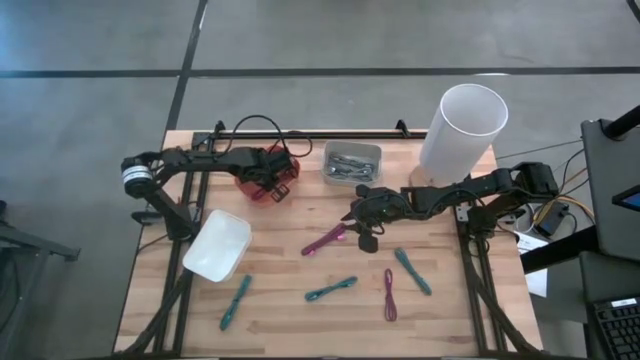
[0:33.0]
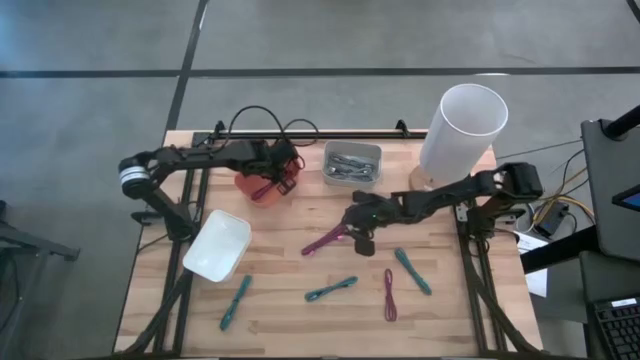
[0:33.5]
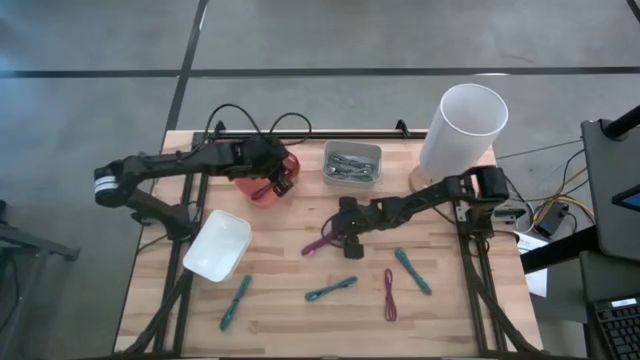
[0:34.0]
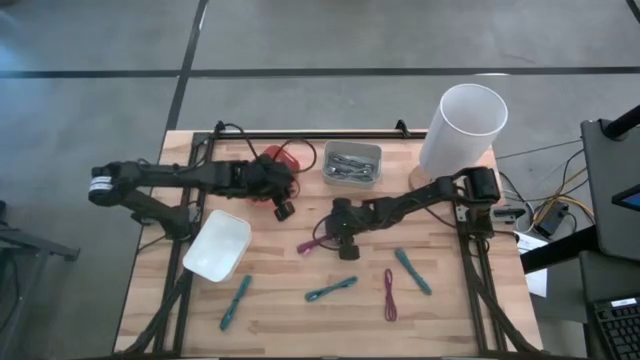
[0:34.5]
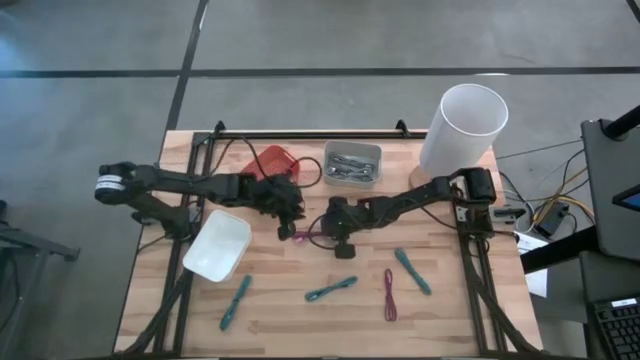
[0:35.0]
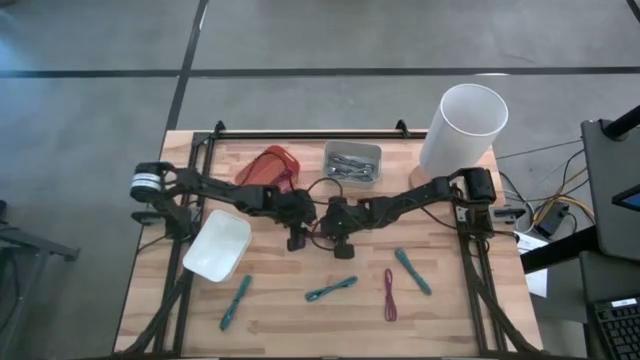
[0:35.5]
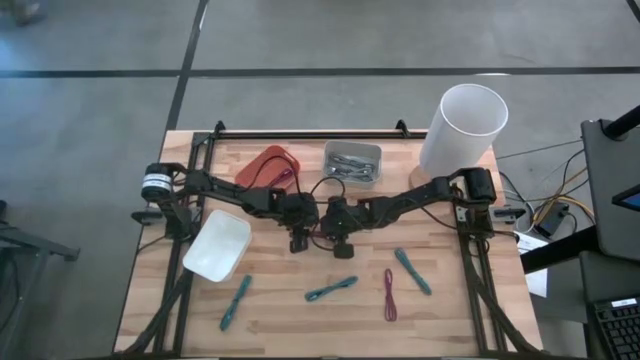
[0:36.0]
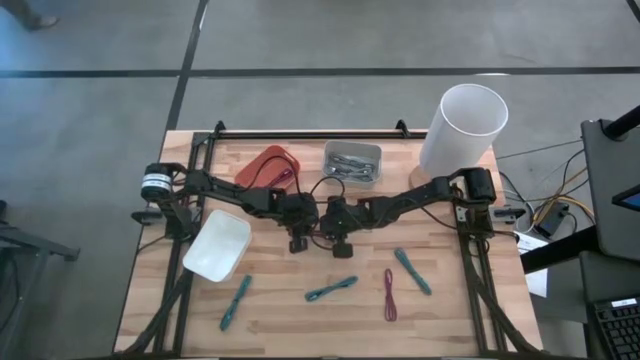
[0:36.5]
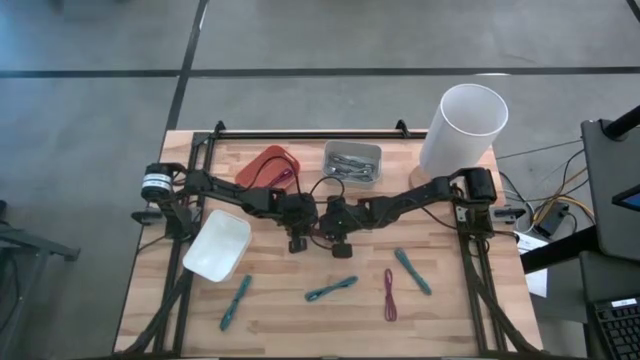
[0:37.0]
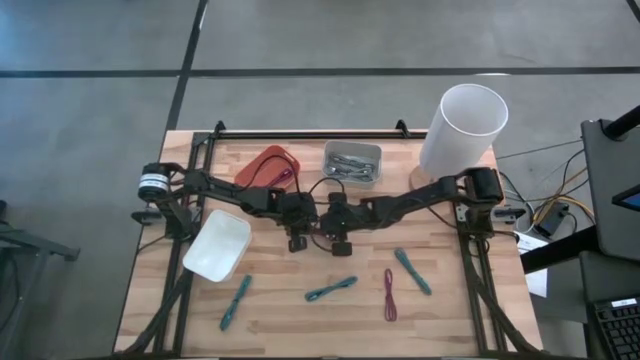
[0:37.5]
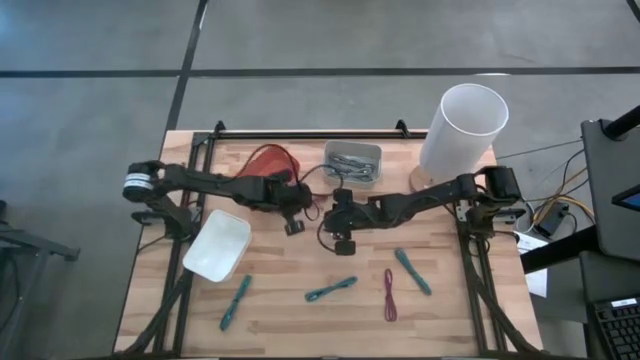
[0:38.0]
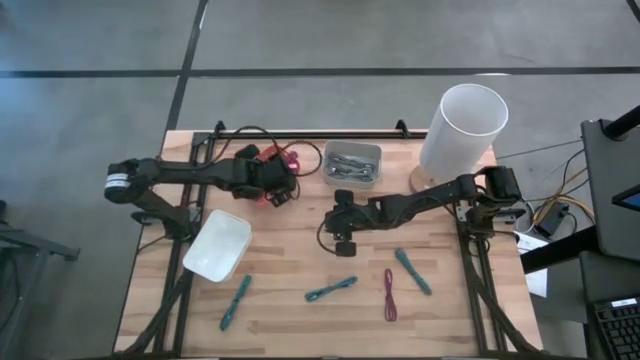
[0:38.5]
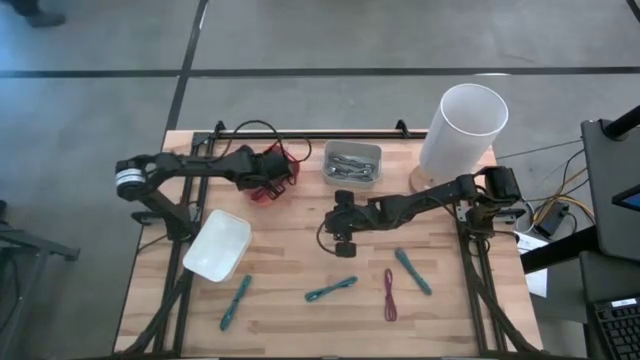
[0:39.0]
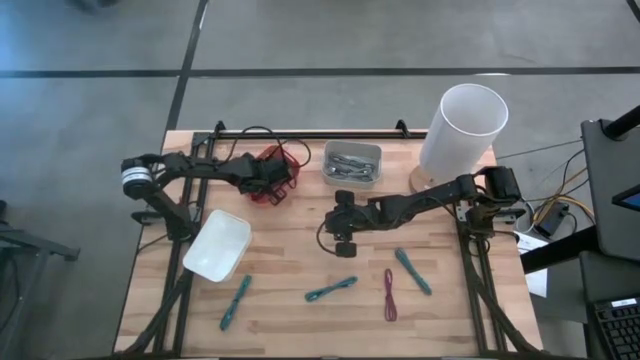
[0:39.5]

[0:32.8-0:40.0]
Task: Pick & Place USB Port
Put the top pink USB cable into the orange bin

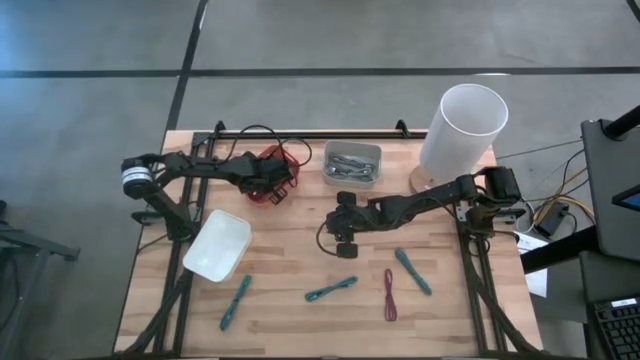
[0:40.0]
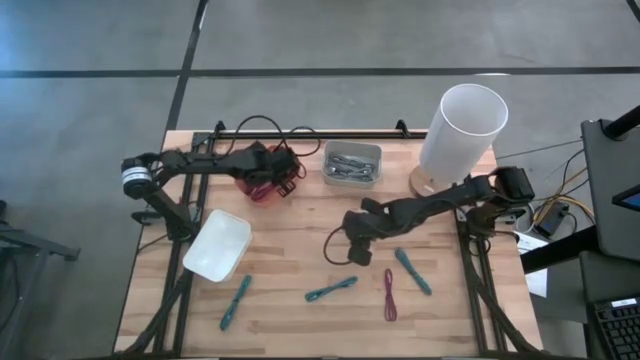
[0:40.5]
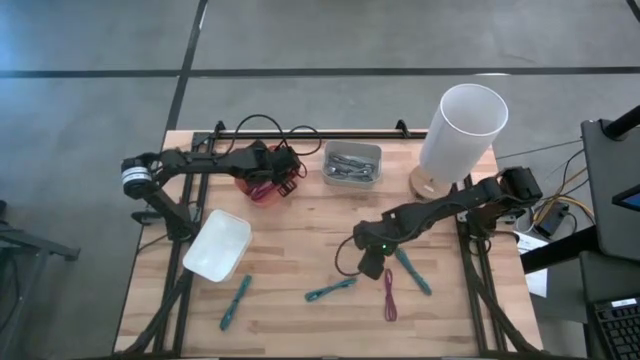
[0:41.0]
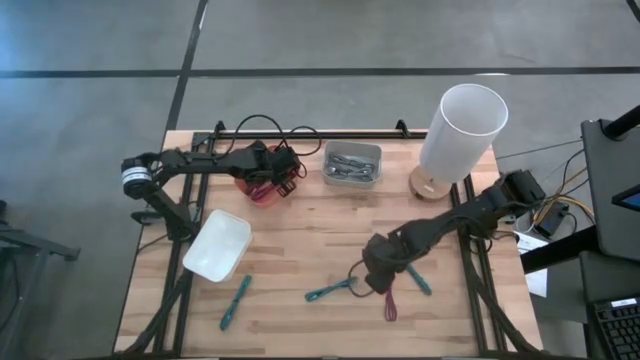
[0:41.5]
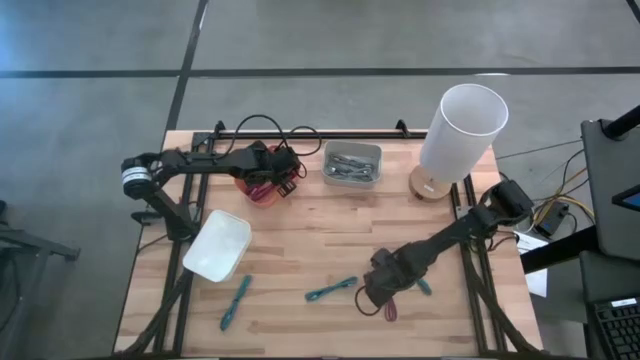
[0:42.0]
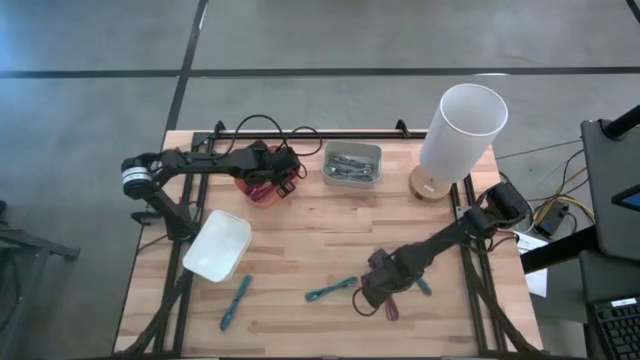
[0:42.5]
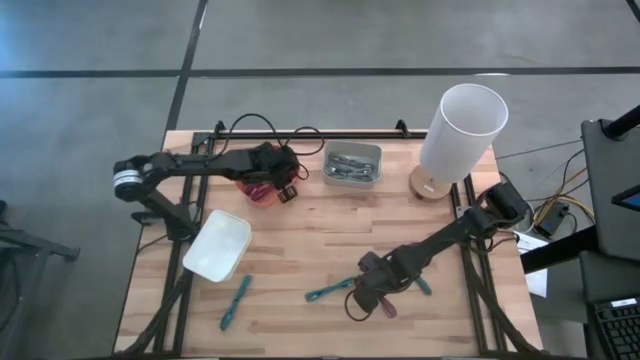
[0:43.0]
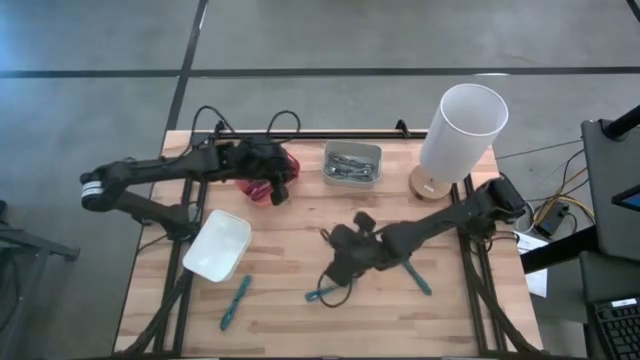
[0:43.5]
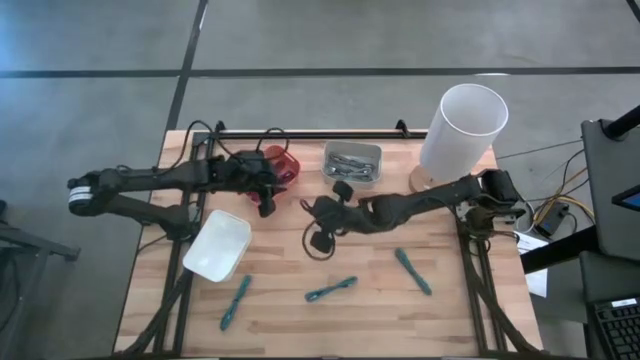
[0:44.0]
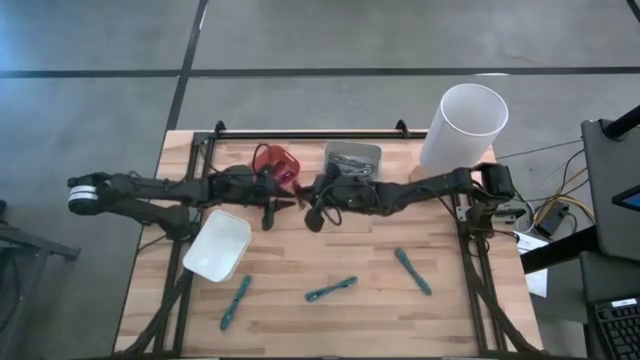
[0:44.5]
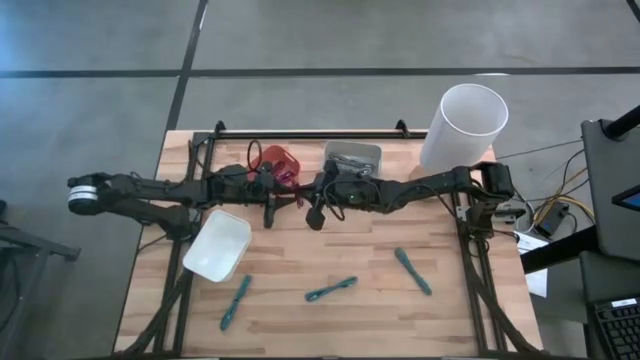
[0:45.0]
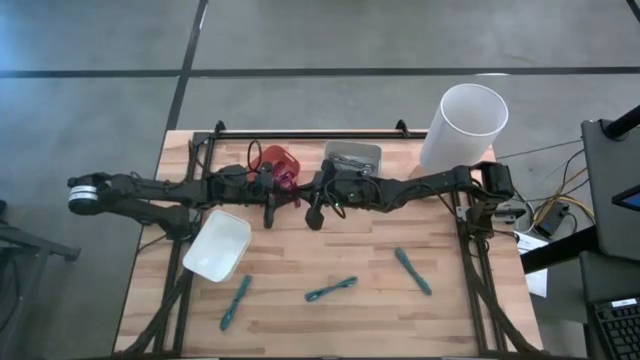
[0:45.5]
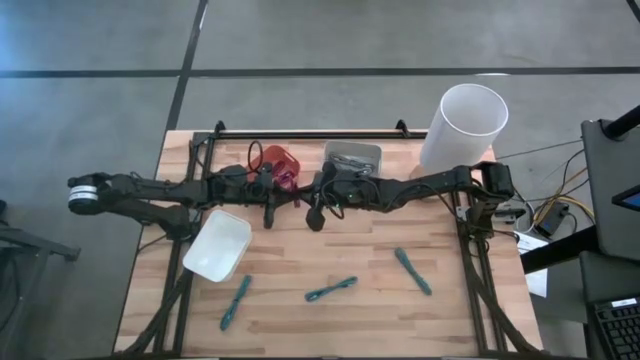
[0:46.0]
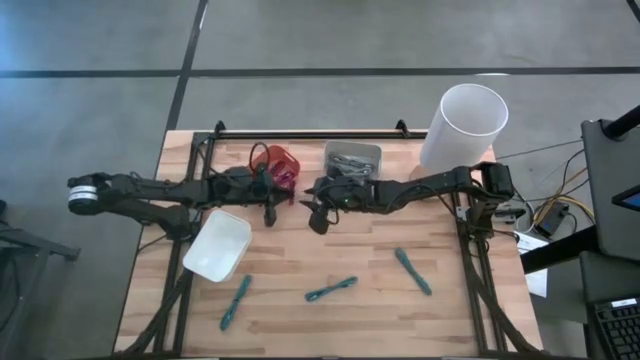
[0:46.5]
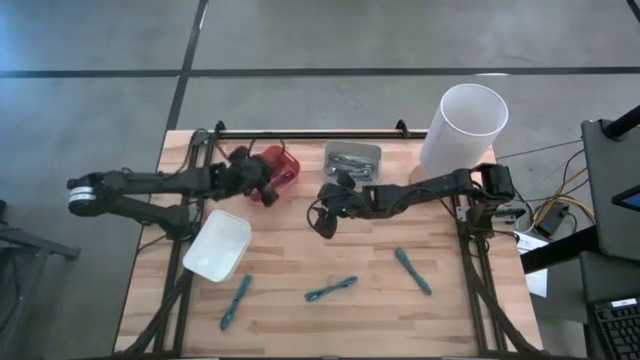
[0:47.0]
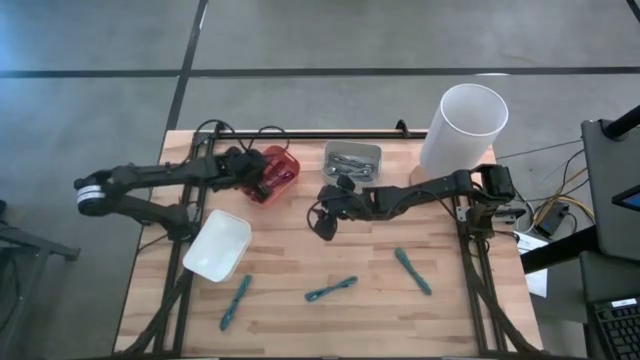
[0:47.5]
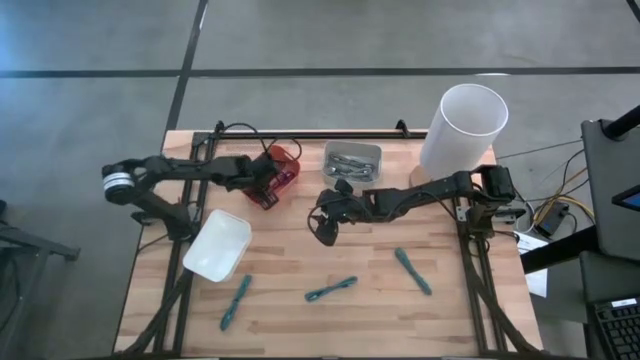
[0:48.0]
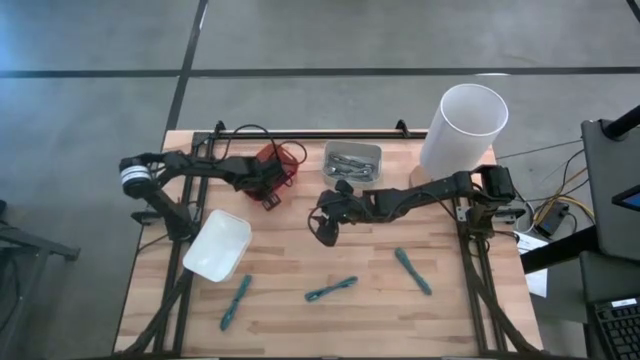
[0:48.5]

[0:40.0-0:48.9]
Put the pink USB cable into the orange bin

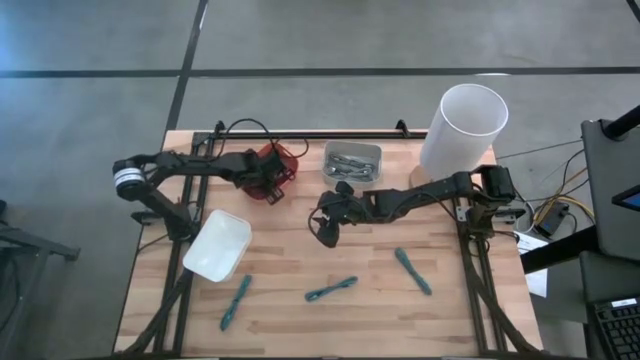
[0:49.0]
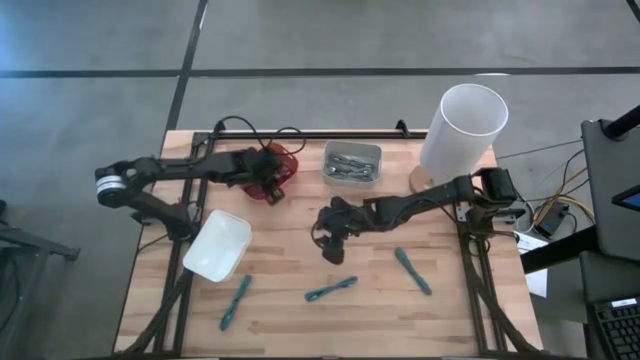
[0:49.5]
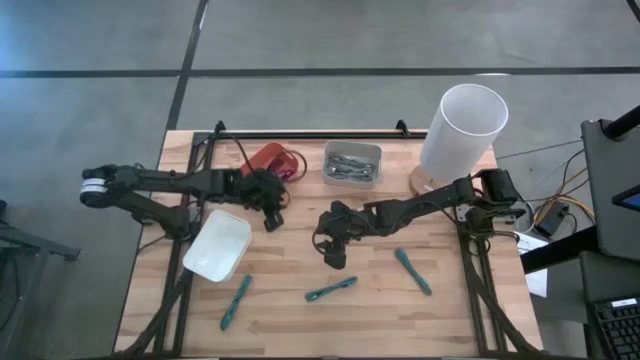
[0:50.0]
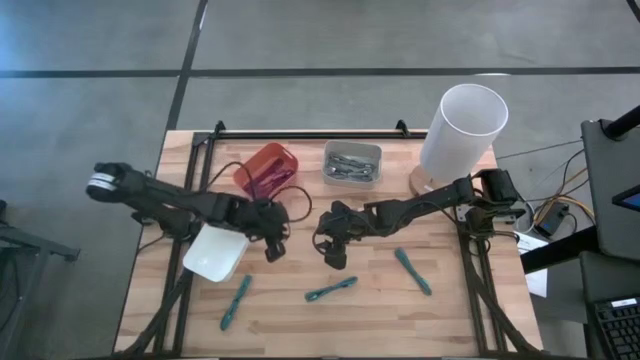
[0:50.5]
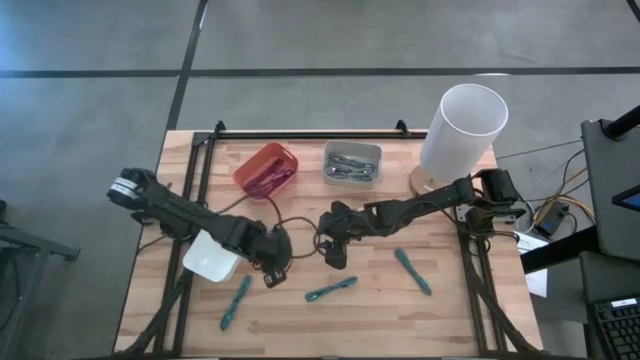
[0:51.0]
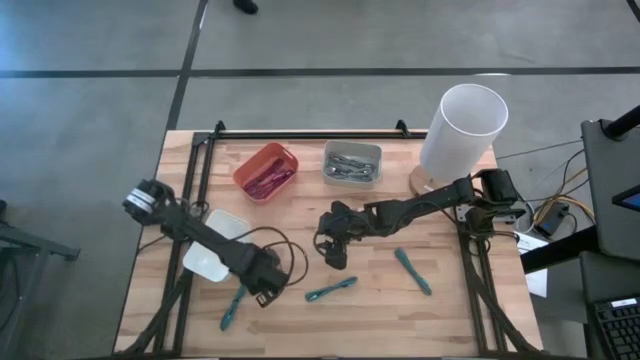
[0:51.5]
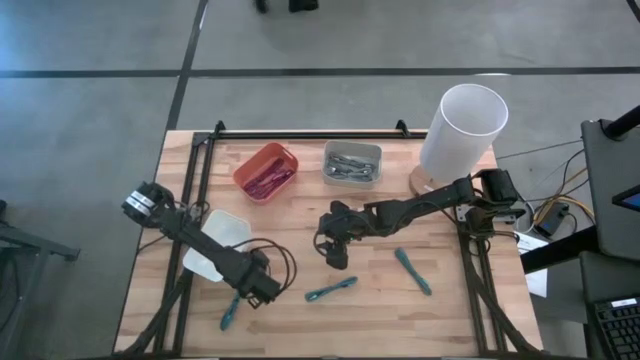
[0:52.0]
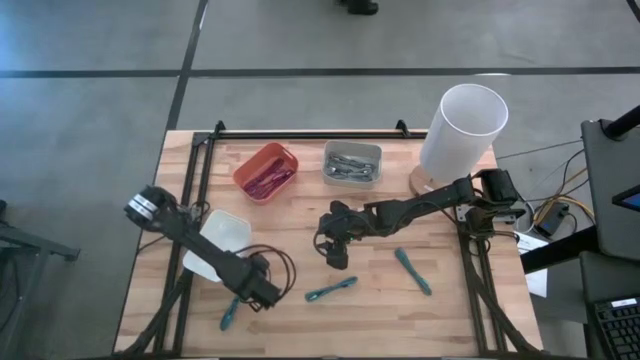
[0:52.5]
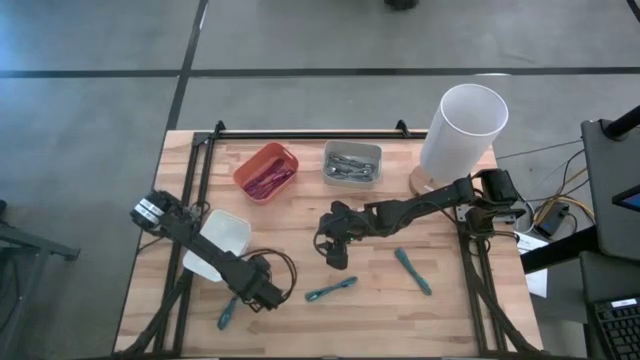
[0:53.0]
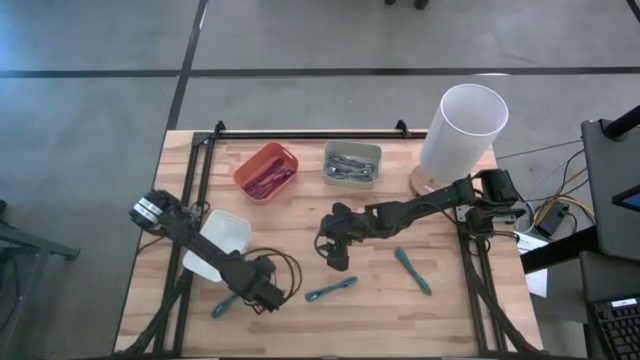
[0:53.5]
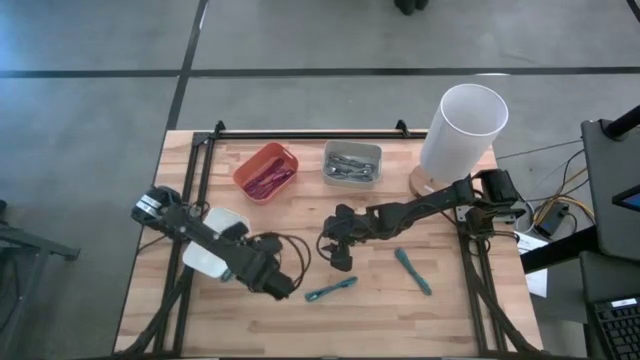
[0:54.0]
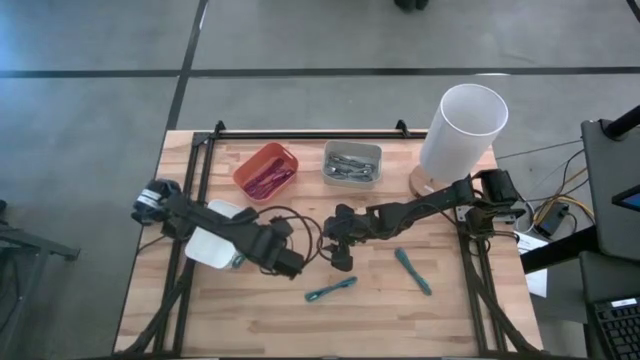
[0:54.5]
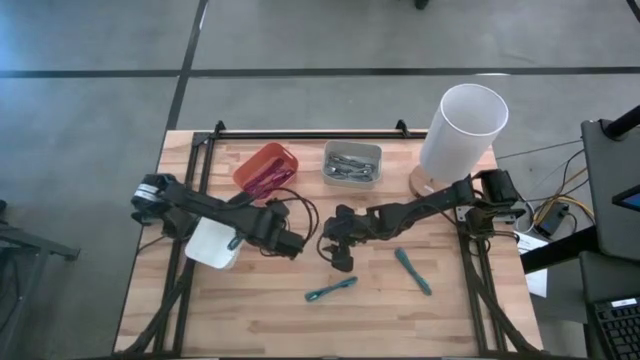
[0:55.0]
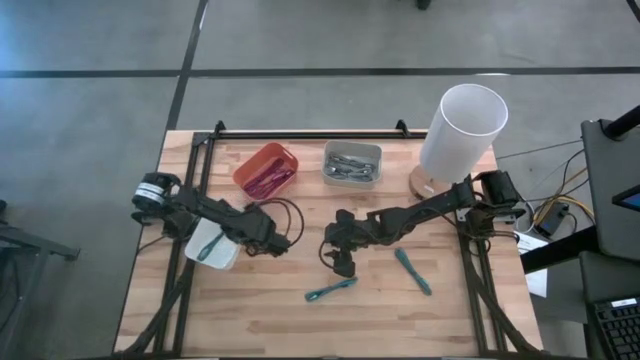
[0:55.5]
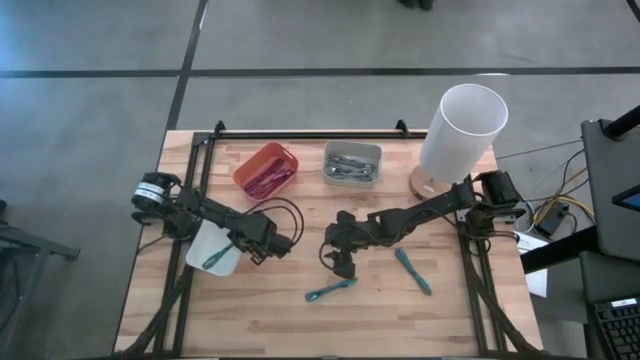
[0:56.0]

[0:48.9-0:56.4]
Put the left blue USB cable into the white bin
